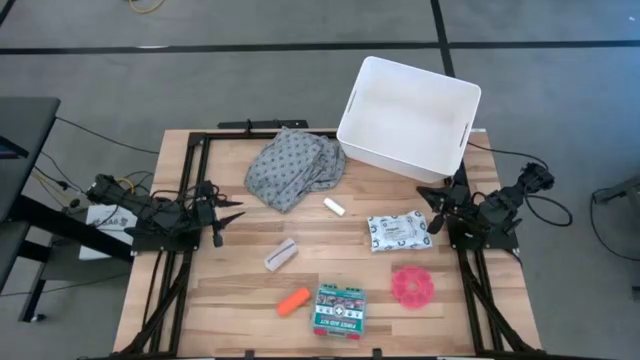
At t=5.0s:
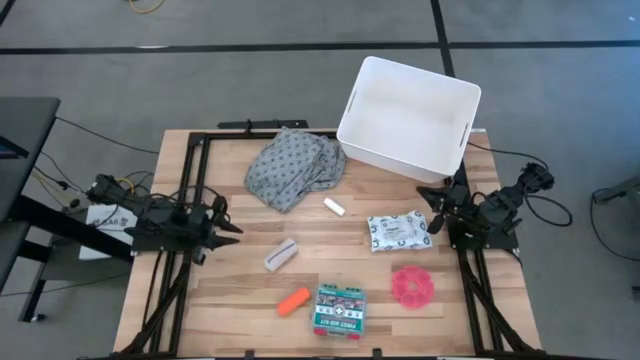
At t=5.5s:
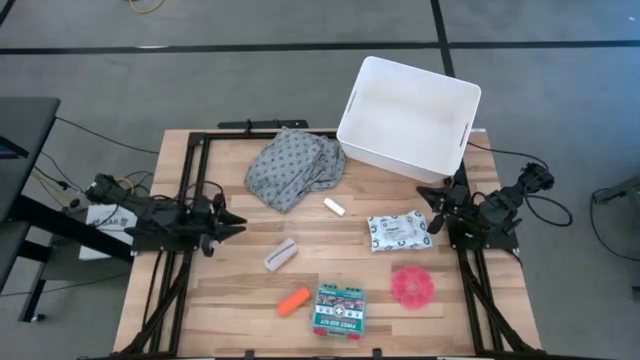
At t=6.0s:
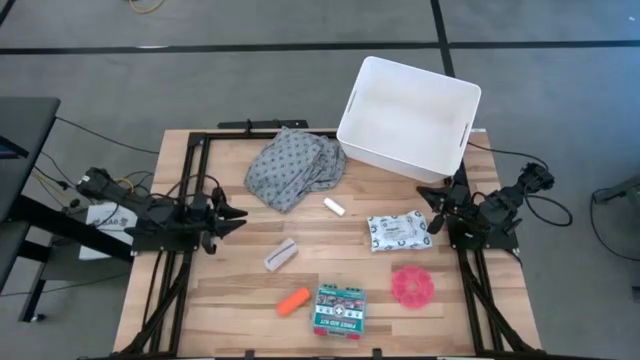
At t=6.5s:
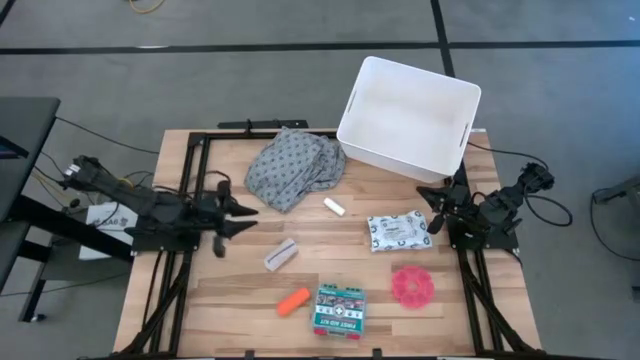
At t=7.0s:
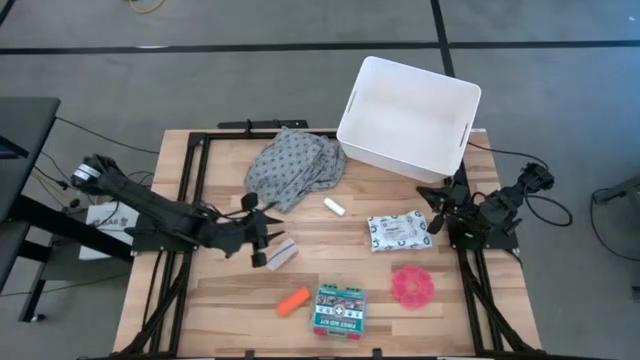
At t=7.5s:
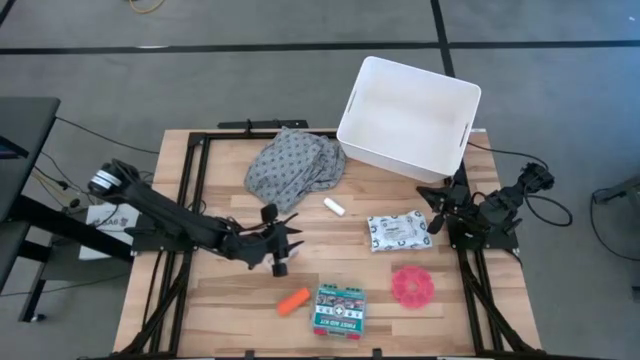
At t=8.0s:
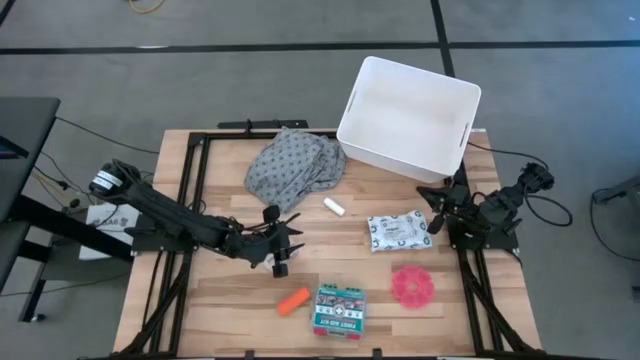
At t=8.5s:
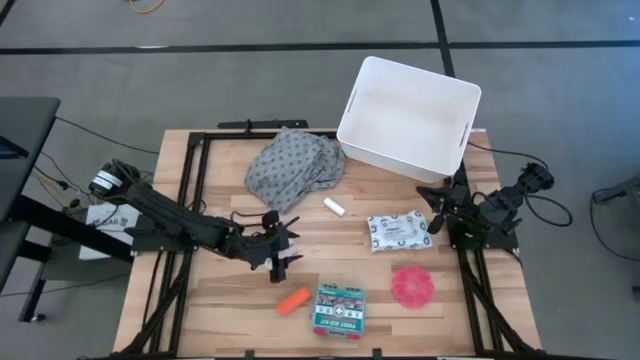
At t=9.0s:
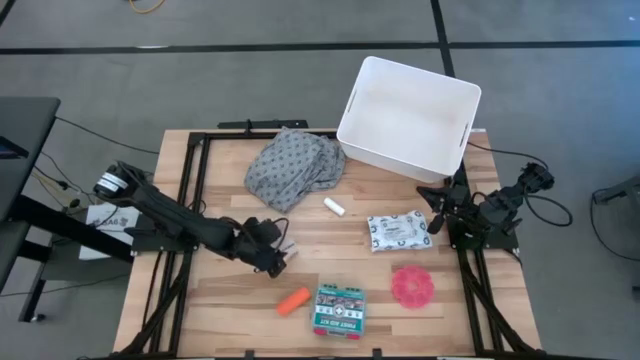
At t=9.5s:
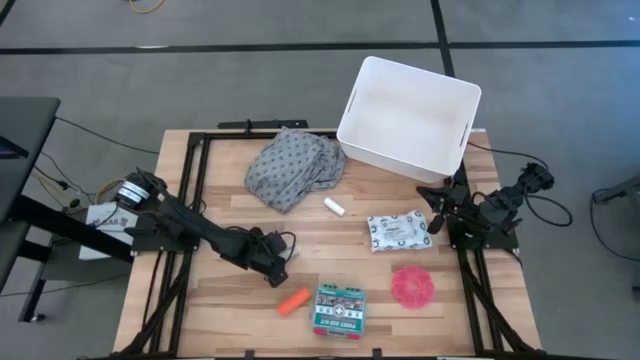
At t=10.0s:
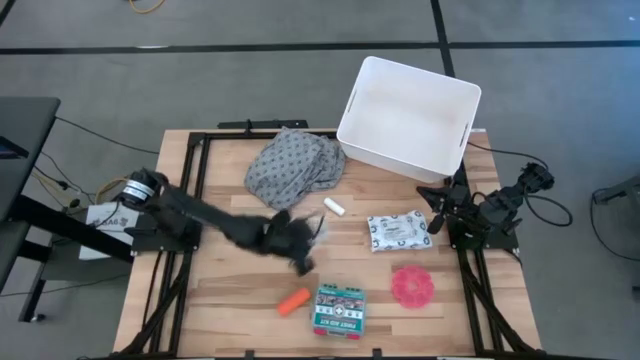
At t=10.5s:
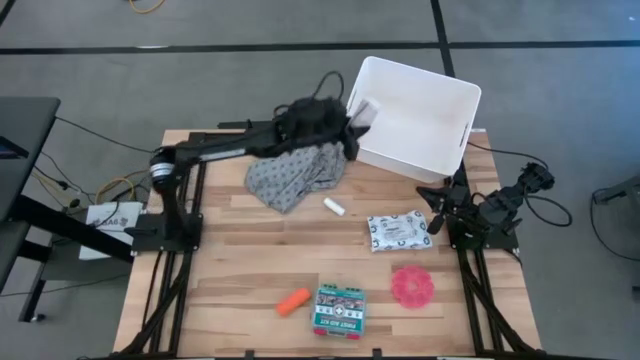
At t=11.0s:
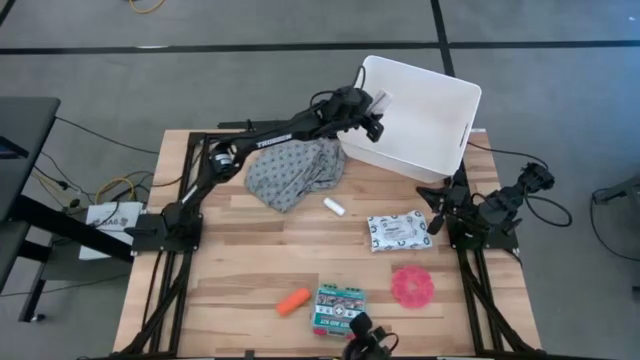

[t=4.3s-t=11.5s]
Task: Pick & place medical supplies in basket/bin
Put the white bandage in the white bin

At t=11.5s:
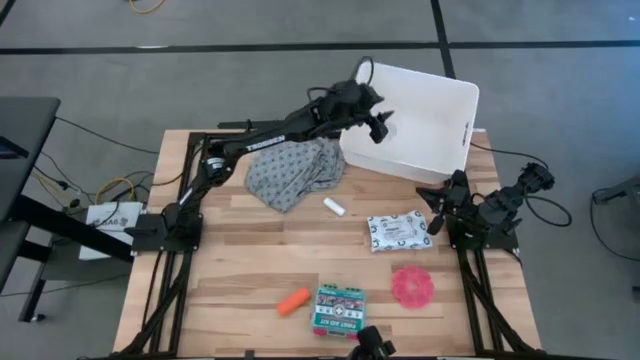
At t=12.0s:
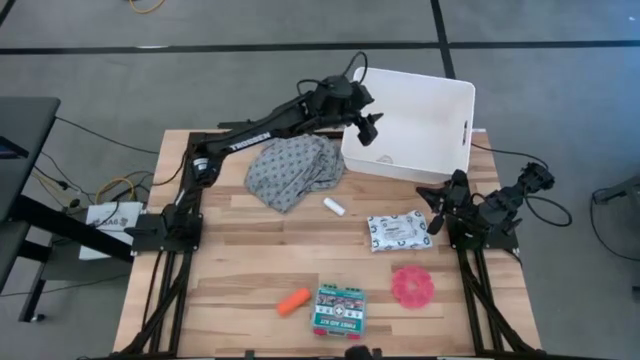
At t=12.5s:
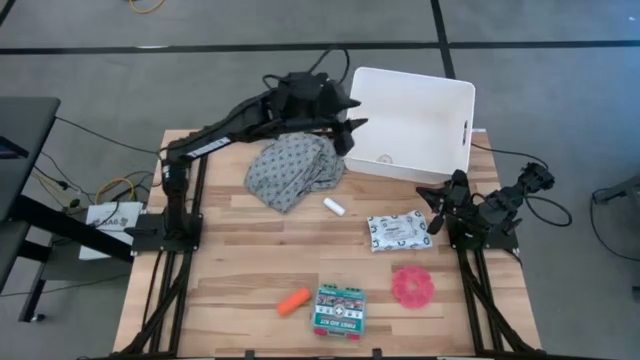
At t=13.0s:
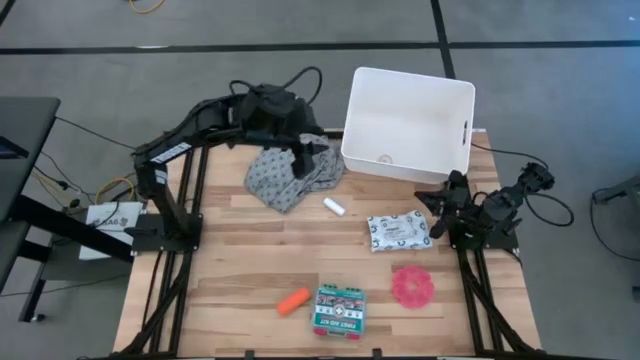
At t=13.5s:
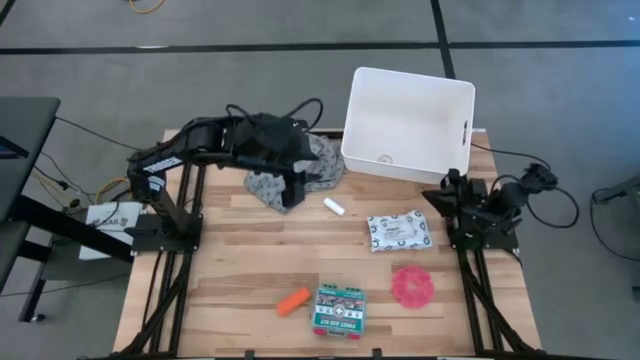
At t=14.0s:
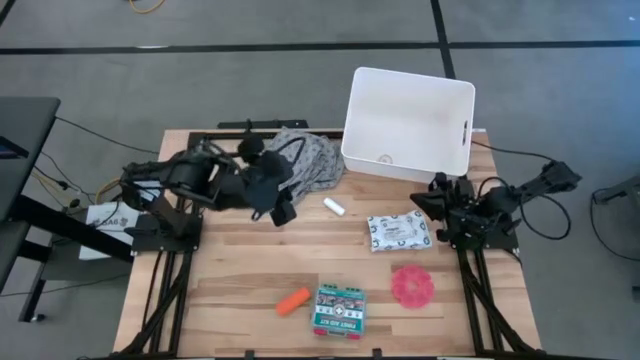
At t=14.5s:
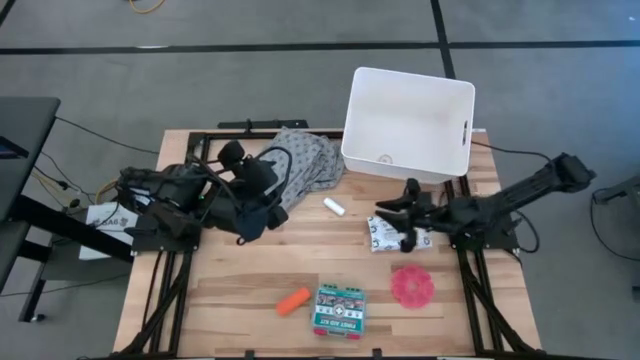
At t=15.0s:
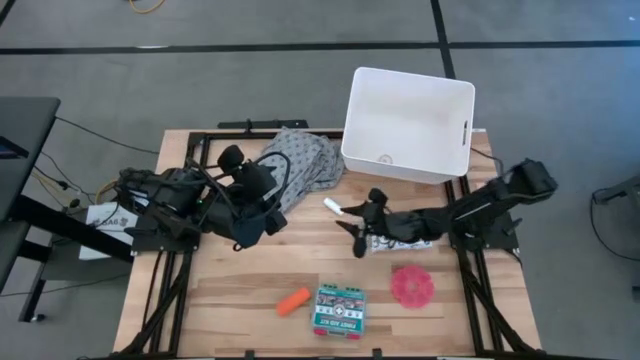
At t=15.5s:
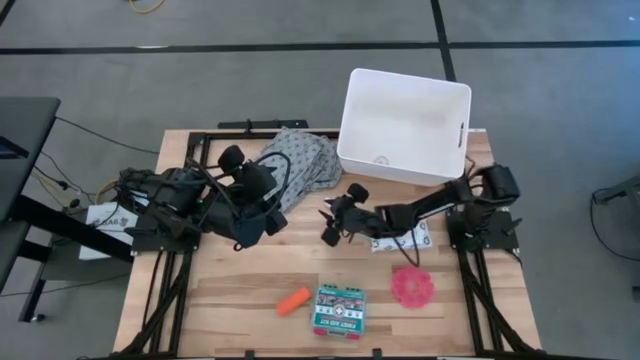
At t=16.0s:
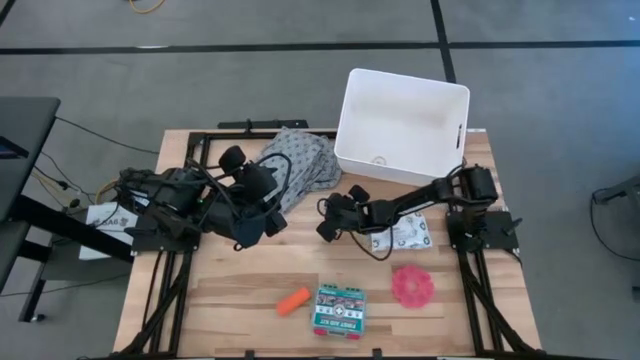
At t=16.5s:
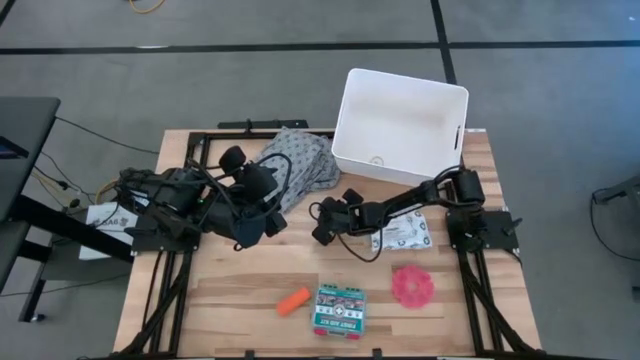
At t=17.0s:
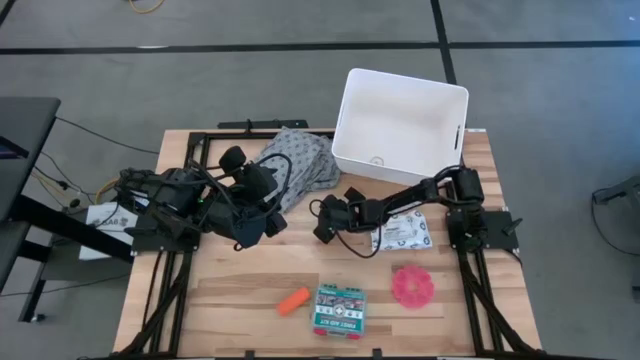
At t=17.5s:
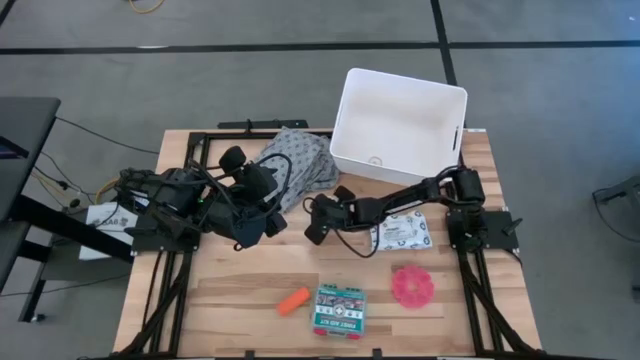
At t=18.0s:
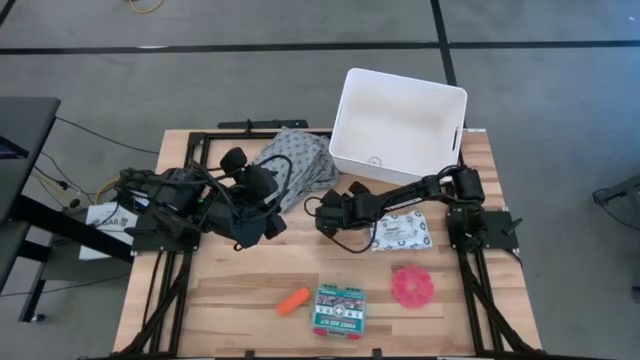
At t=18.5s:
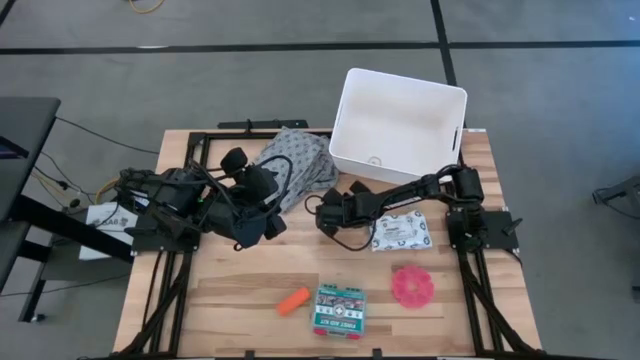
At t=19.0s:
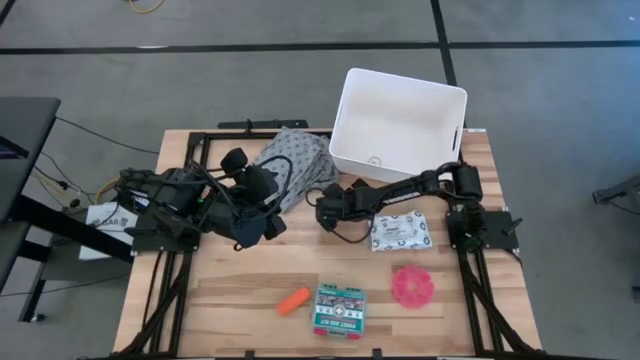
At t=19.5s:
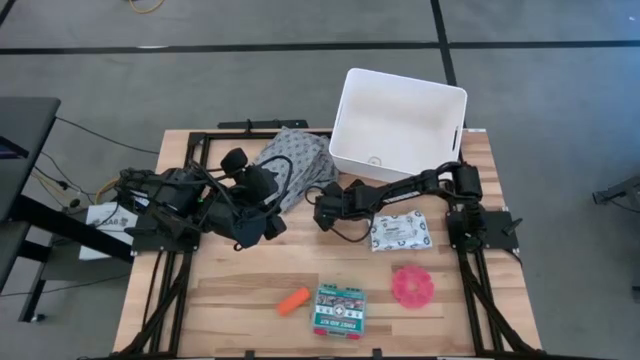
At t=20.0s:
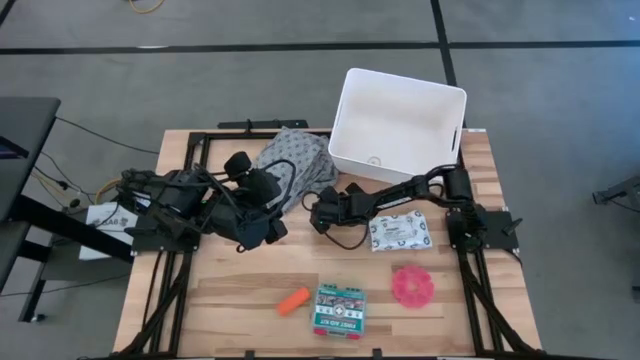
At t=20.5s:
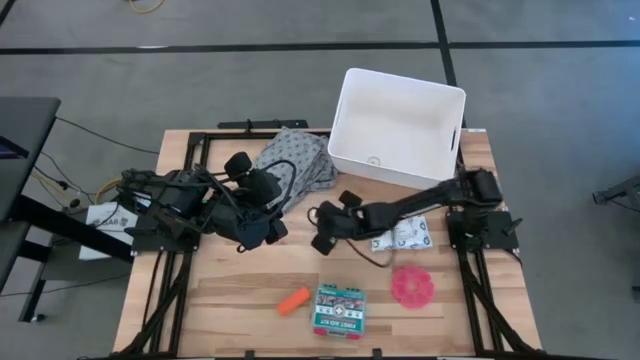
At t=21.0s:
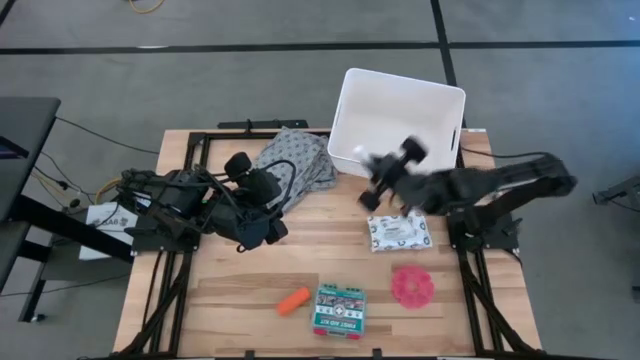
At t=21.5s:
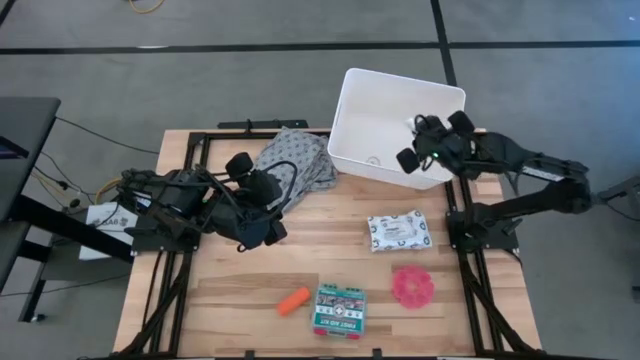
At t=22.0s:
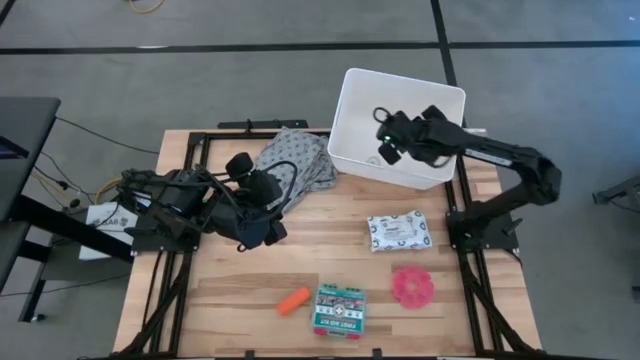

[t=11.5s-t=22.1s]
Put the white gauze in the white bin

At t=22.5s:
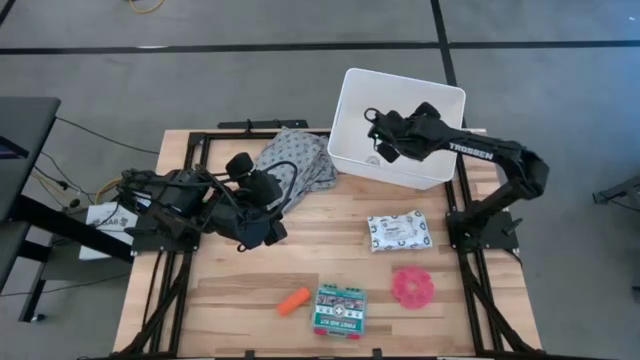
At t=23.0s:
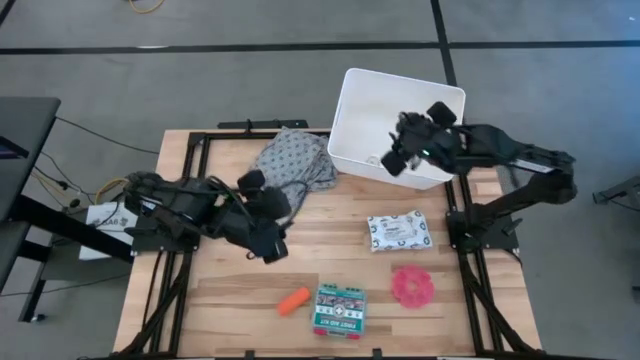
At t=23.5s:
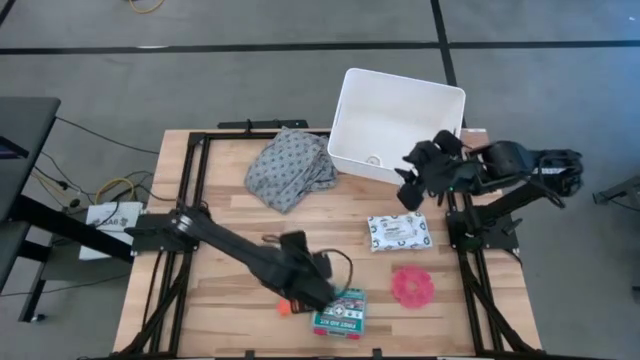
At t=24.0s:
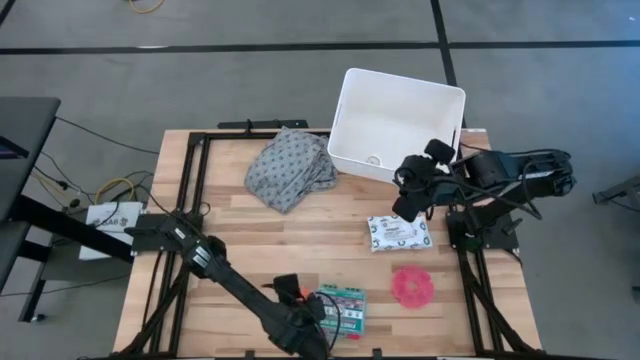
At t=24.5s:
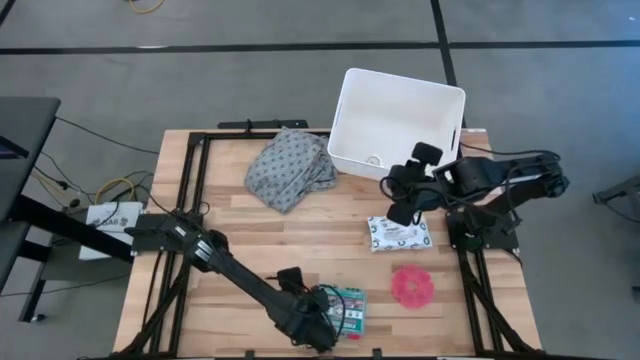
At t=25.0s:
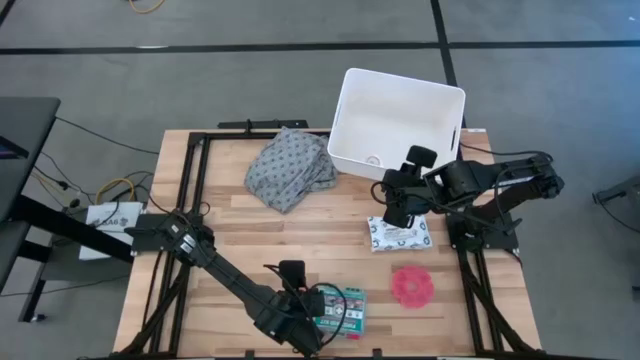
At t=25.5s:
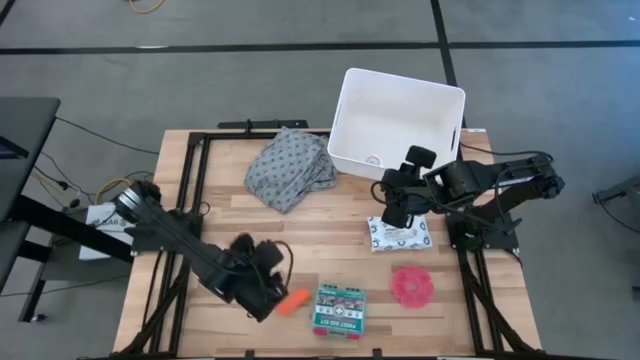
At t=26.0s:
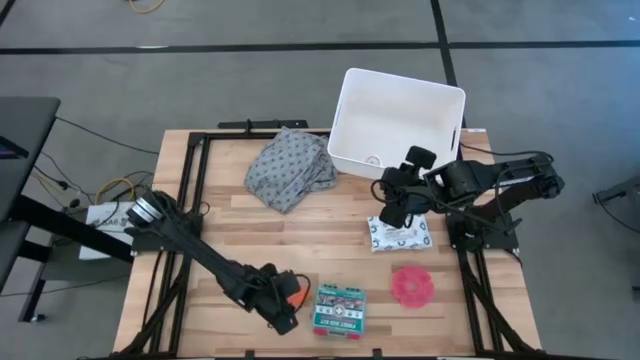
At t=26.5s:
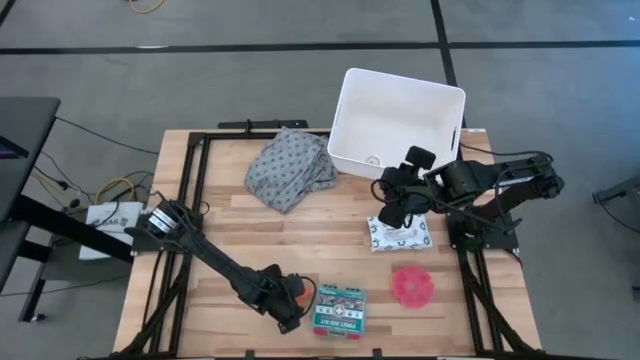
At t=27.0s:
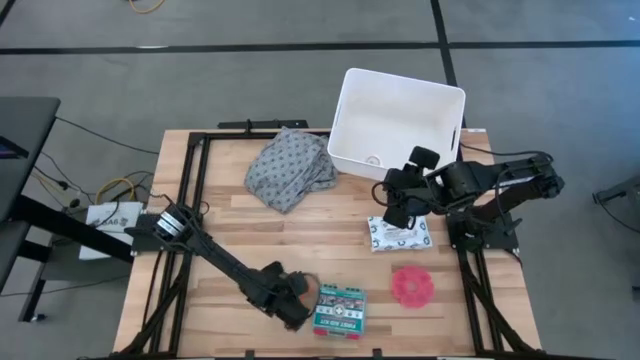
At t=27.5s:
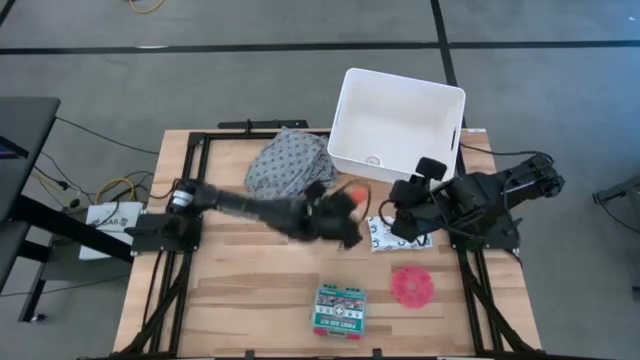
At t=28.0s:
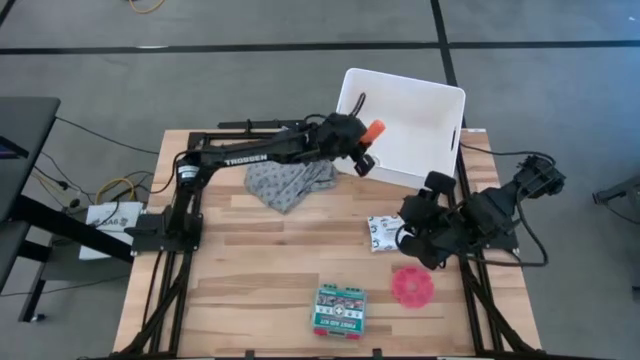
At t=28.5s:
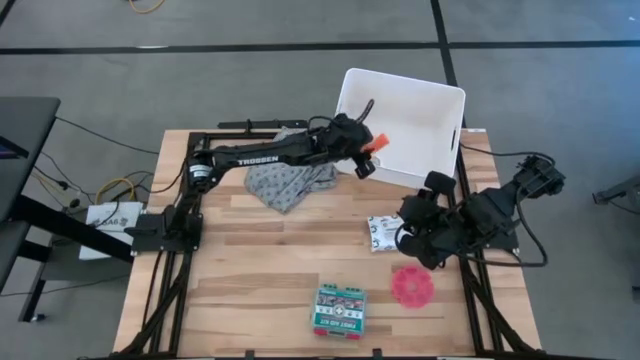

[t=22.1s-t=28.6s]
Put the orange bandage in the white bin
